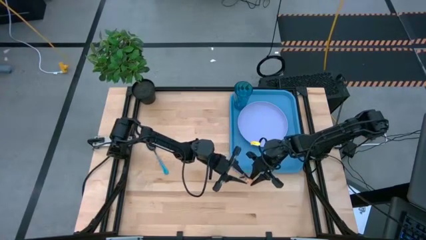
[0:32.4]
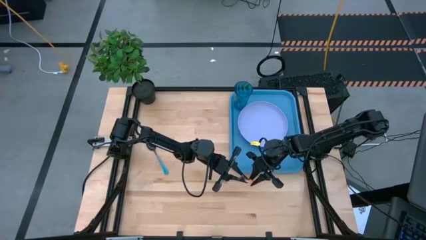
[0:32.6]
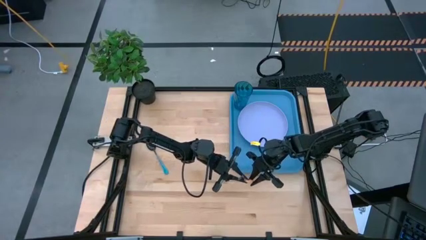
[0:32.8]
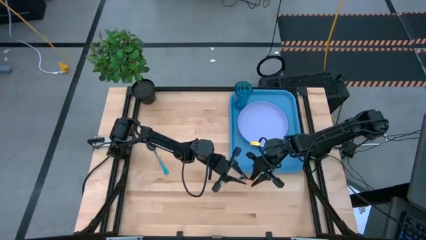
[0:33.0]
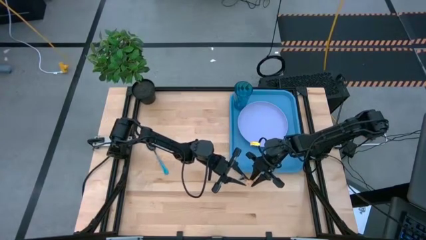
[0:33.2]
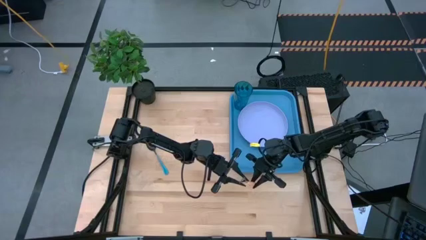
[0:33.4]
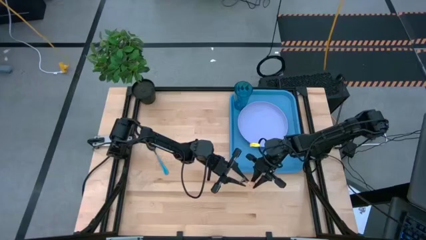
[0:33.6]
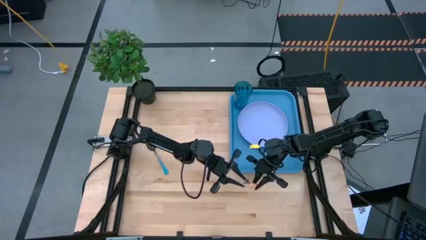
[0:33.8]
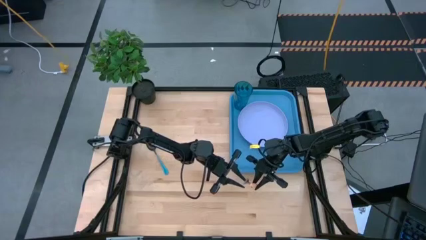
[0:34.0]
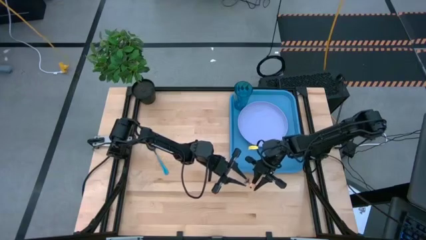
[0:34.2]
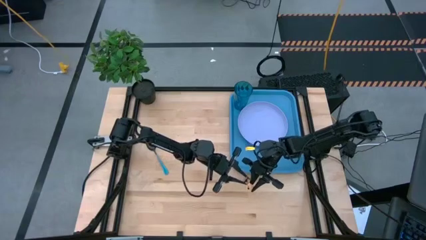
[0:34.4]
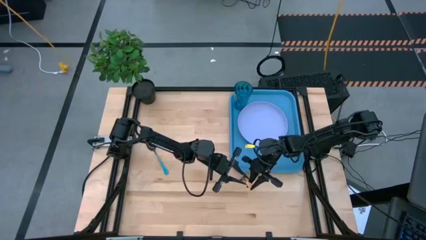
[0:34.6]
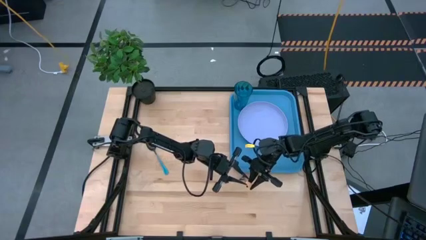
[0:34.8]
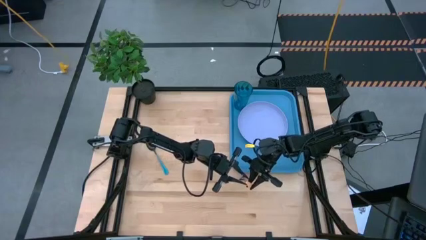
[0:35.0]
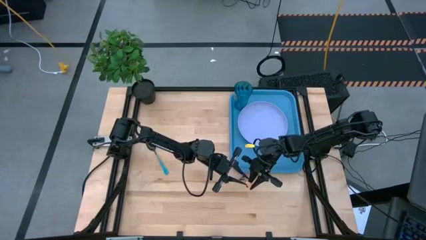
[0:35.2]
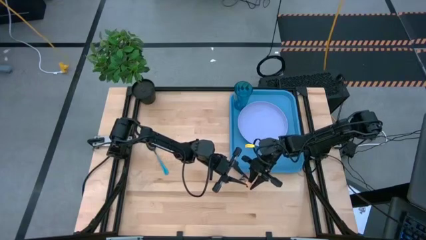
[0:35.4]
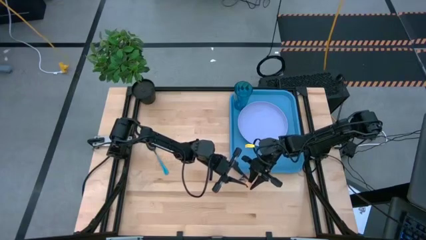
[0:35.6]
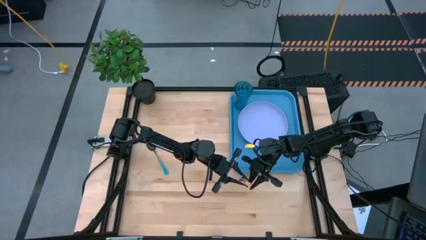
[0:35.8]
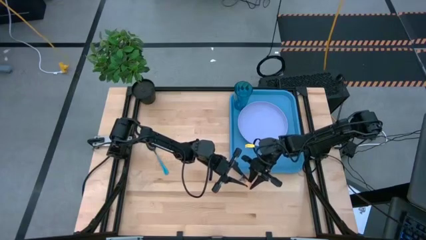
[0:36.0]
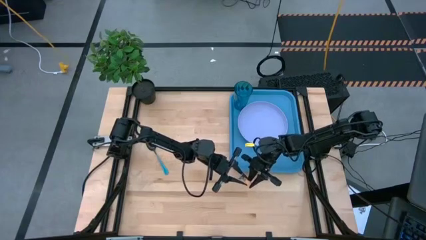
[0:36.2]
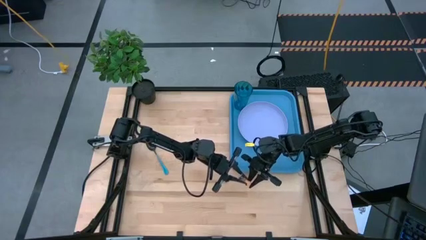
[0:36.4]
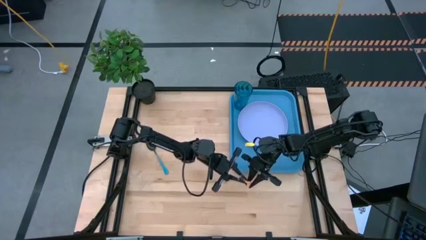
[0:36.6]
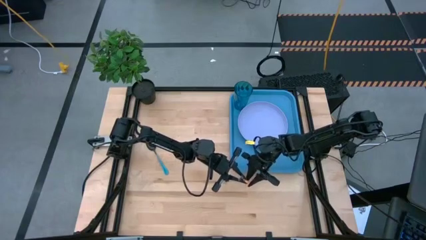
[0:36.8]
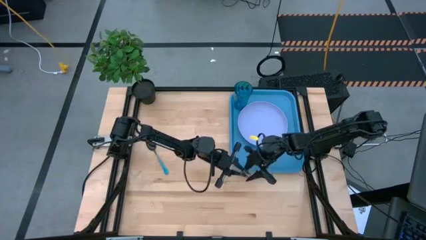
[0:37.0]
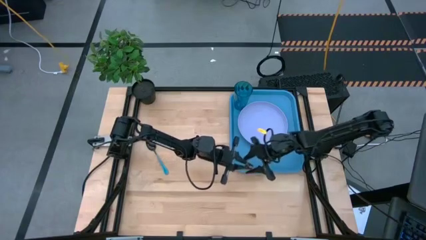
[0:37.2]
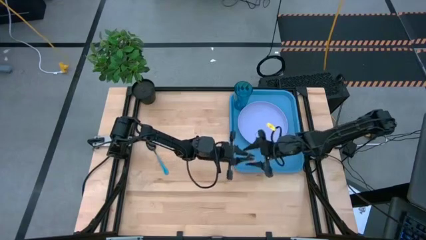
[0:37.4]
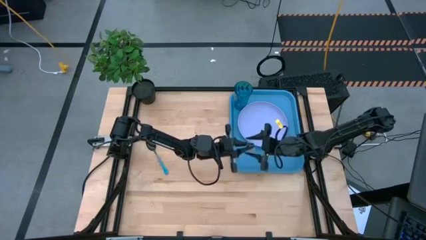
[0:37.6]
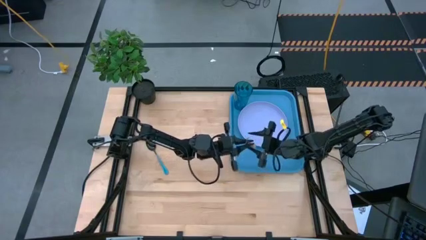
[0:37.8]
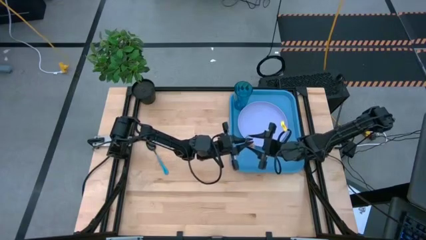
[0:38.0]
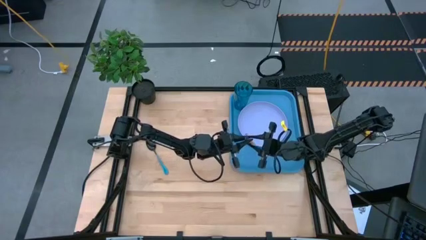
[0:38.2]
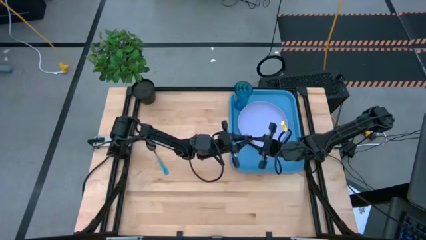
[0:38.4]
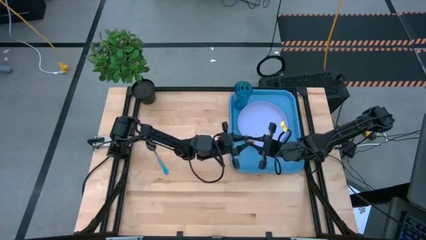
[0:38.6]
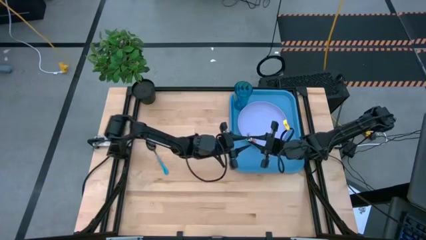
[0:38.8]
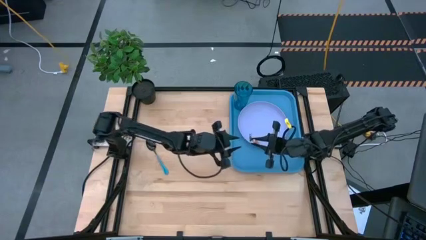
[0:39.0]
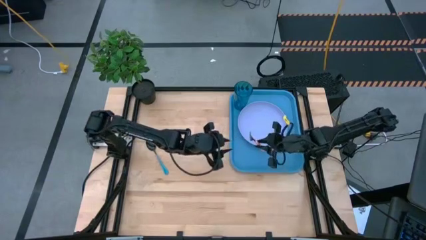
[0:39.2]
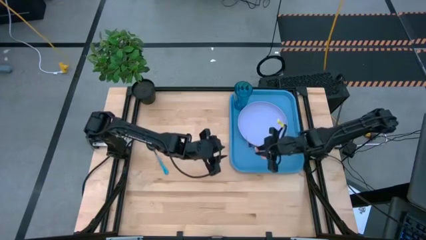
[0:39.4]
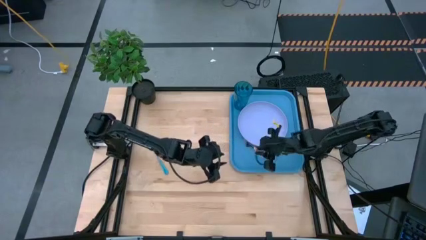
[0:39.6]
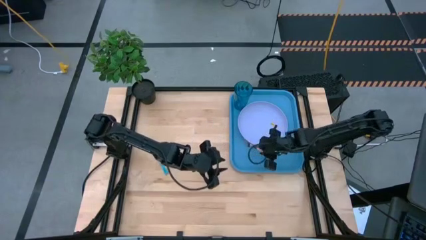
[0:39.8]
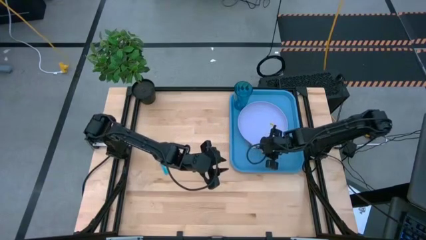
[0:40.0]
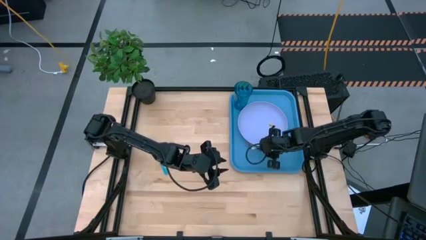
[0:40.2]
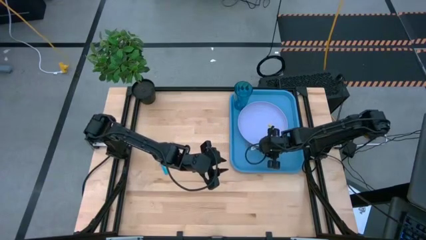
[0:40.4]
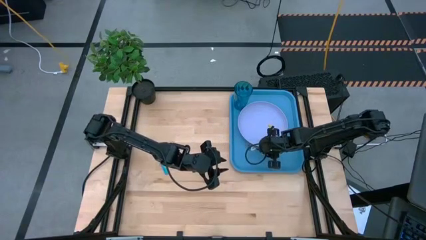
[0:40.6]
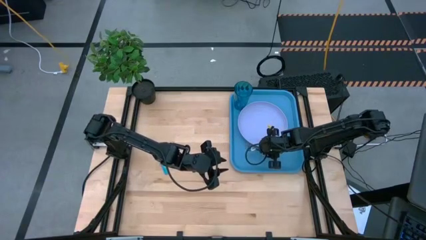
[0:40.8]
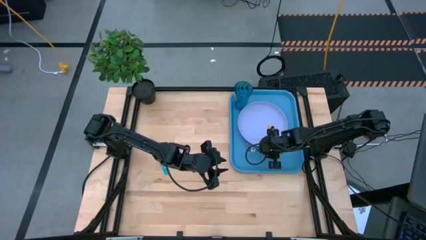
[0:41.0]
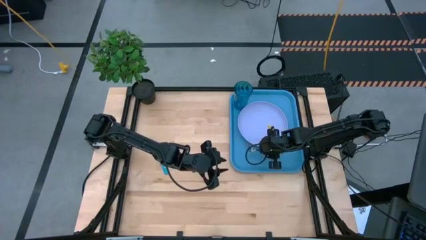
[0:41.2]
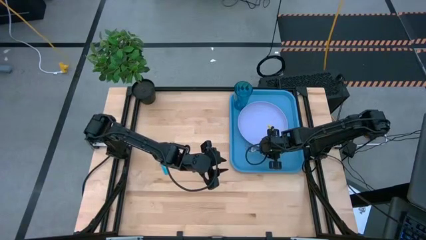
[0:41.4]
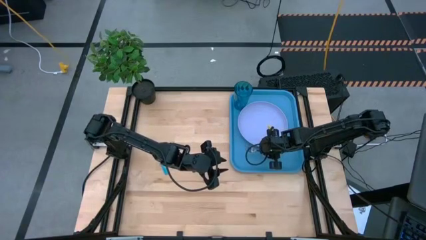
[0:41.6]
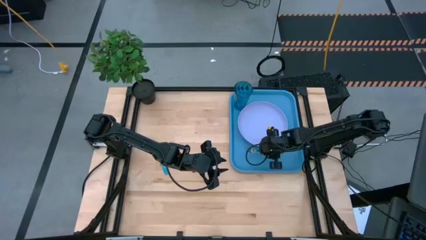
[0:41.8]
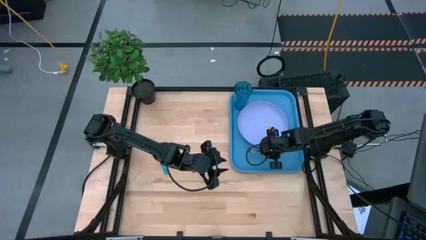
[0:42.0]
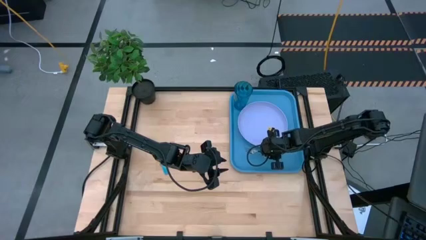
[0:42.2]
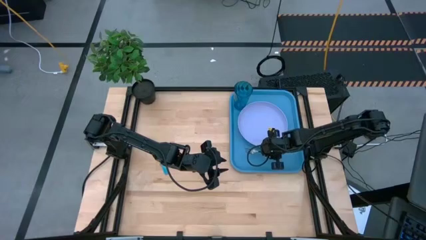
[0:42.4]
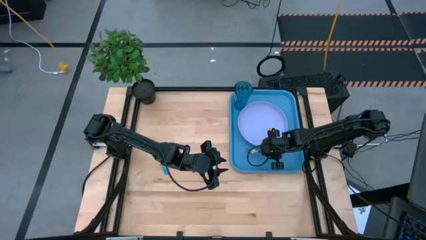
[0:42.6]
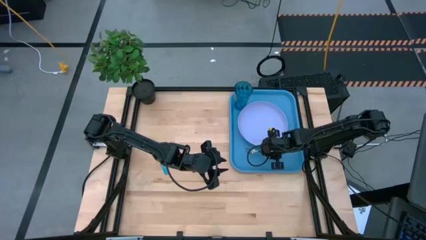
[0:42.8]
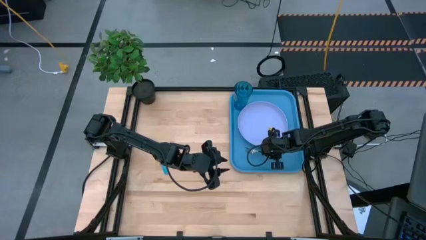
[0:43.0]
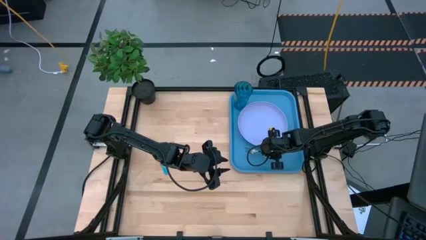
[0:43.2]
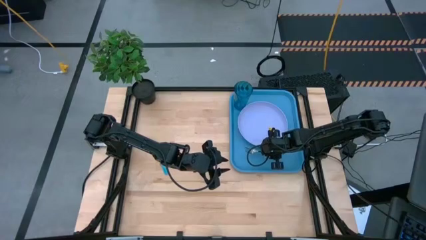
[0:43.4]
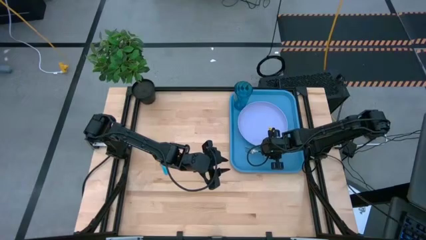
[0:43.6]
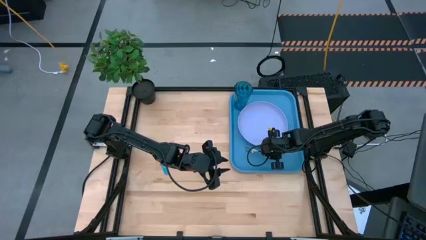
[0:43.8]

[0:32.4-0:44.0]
Task: Pick and place plate/cup/fork/spoon on tray
Put the brown fork on the blue table tray under the purple plate
